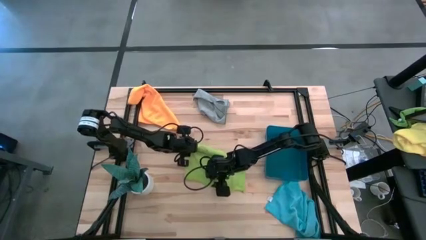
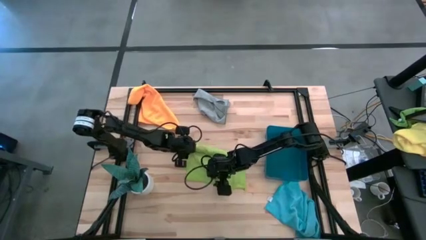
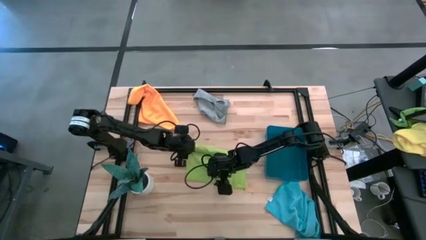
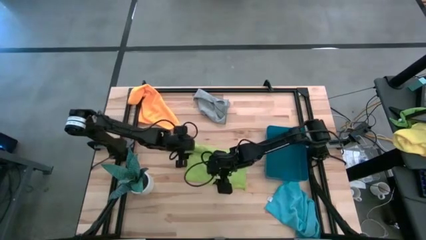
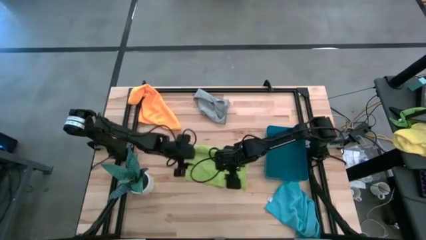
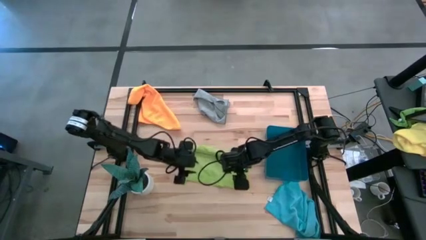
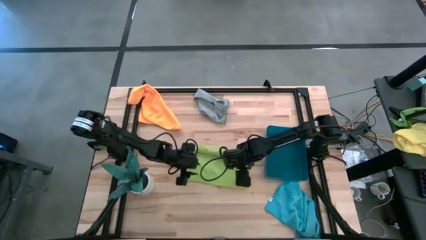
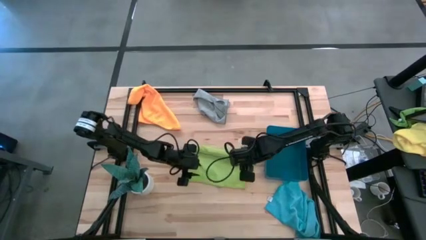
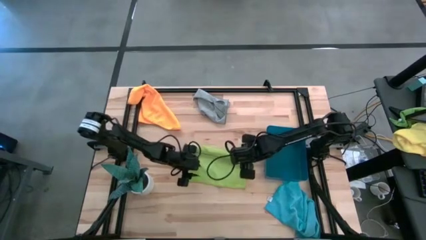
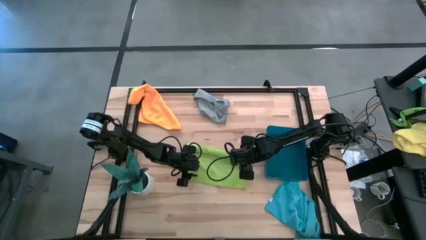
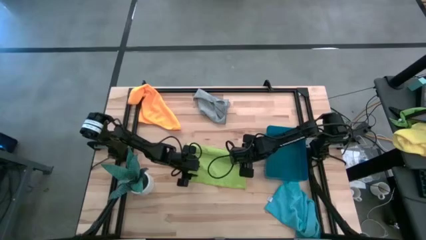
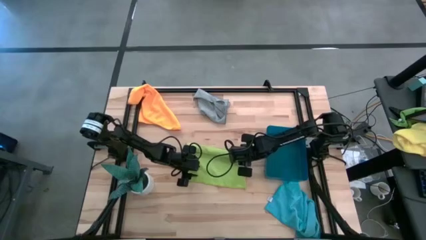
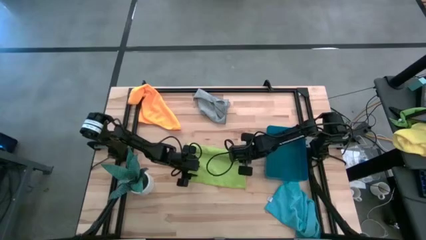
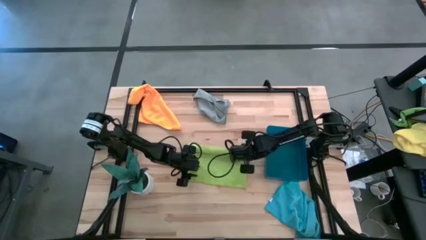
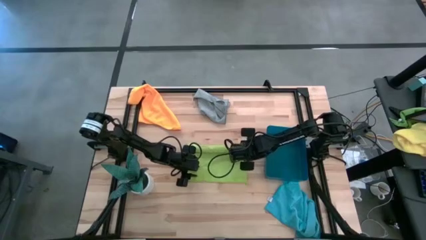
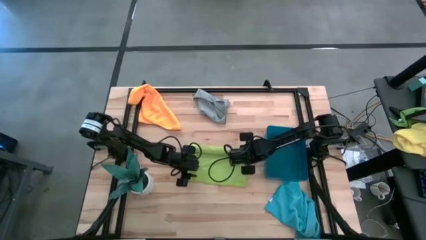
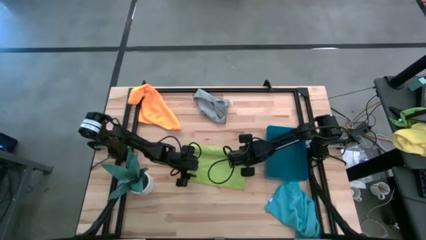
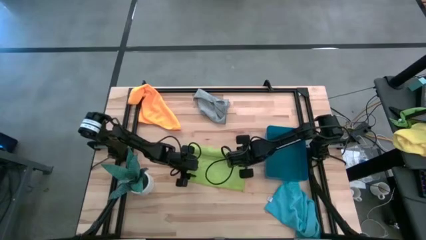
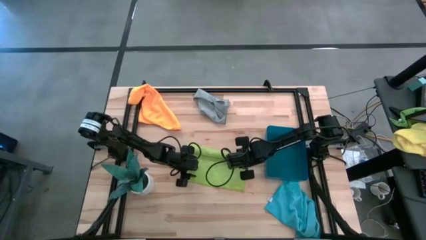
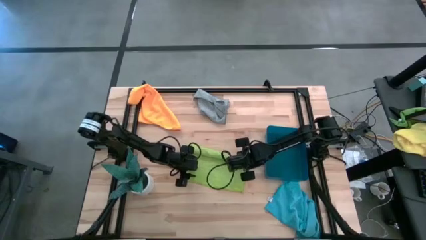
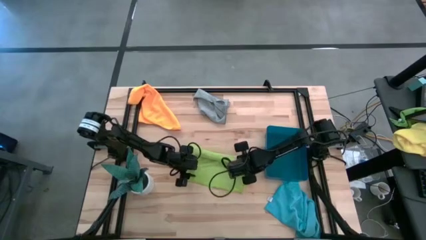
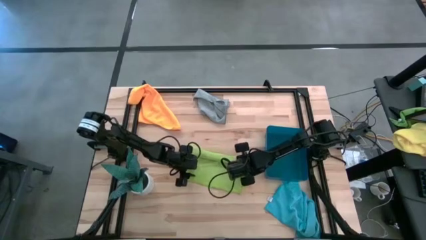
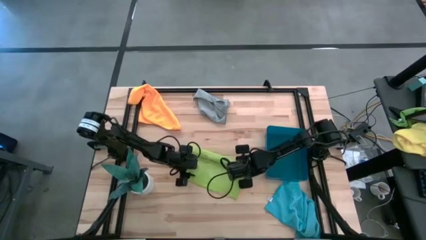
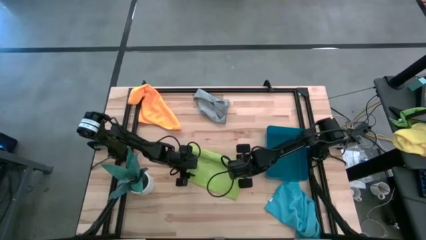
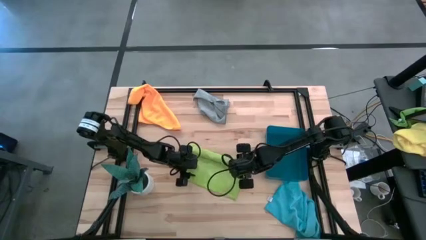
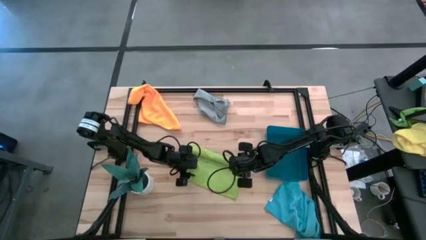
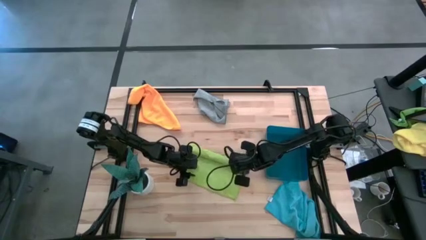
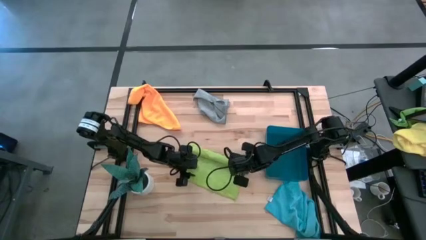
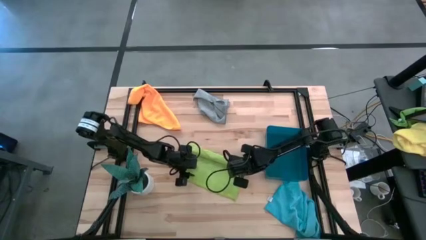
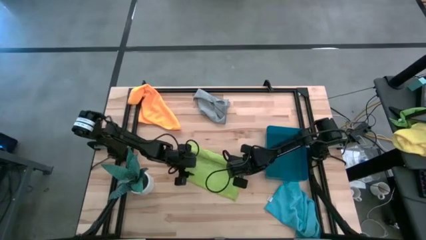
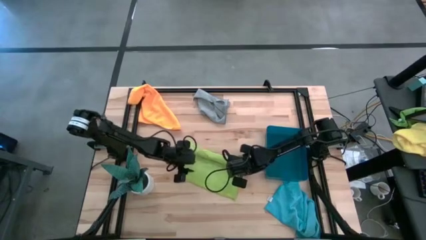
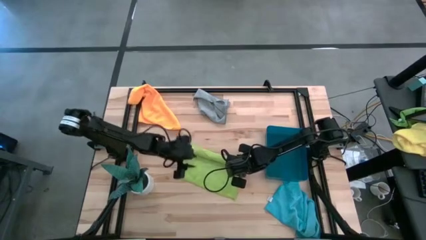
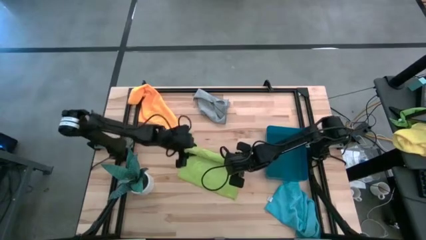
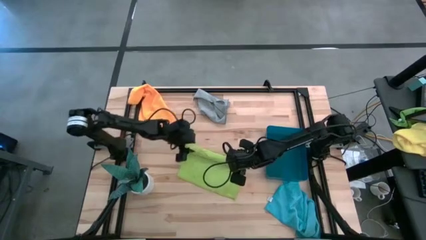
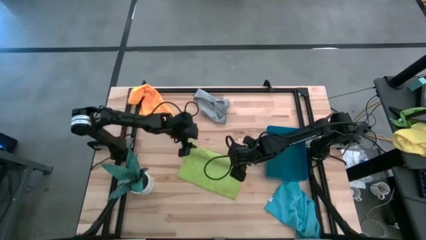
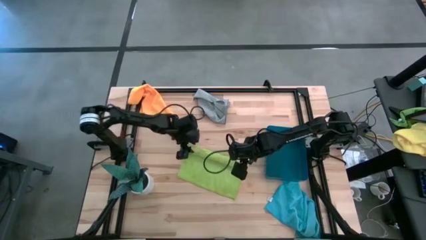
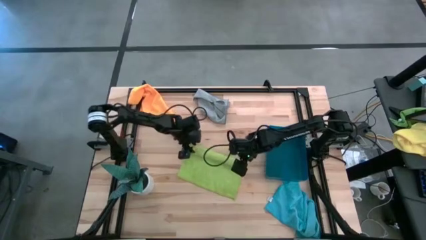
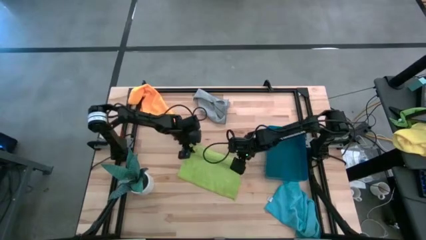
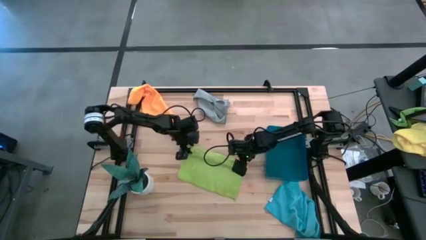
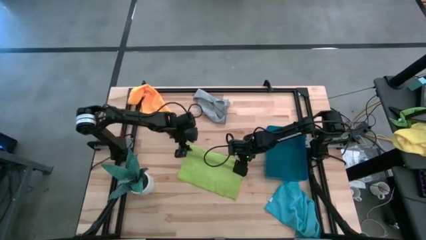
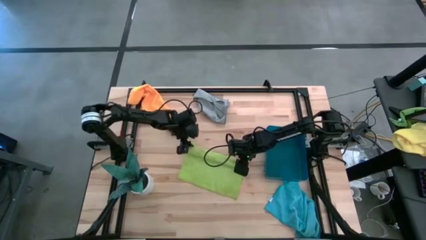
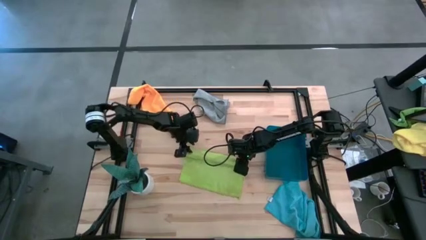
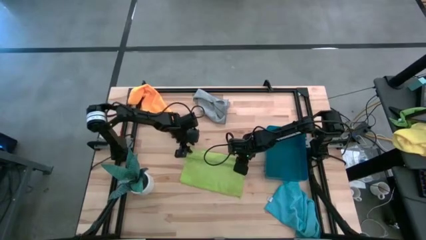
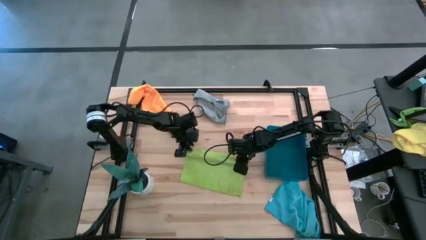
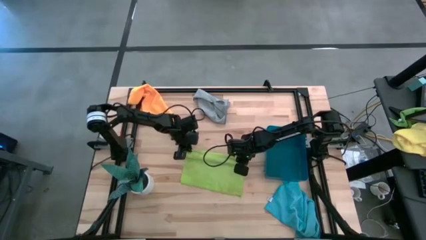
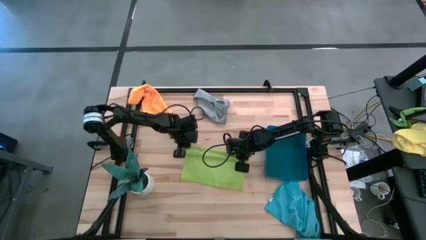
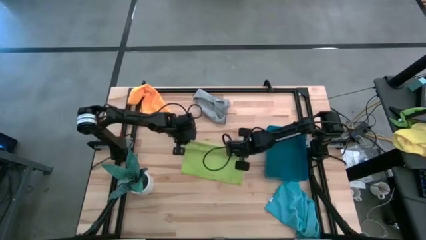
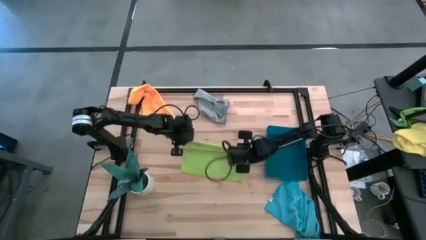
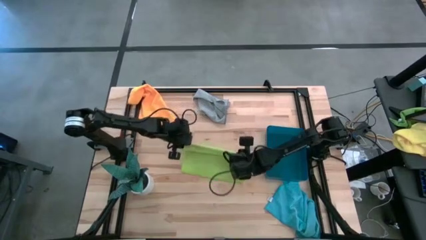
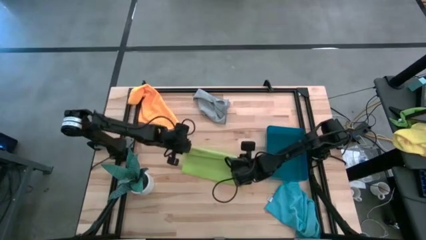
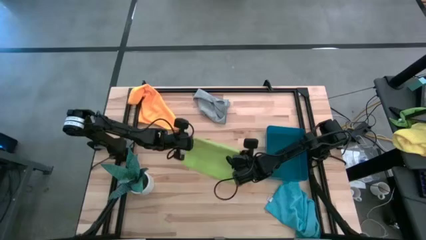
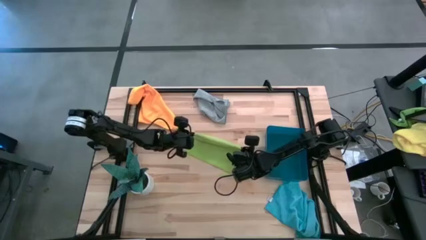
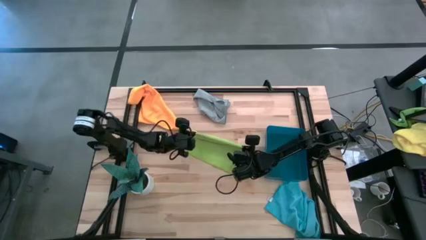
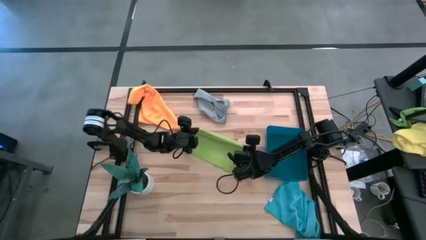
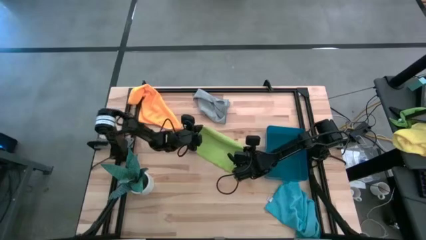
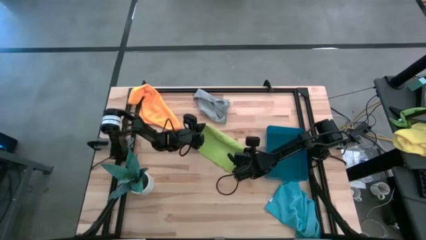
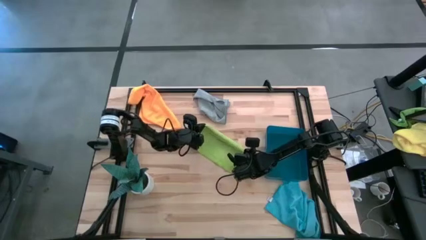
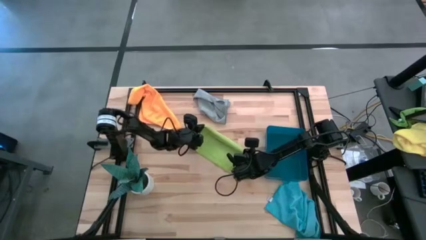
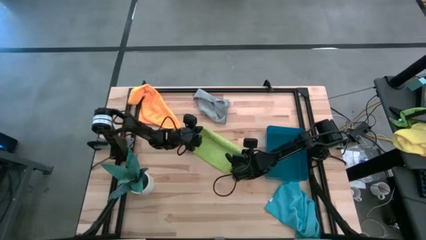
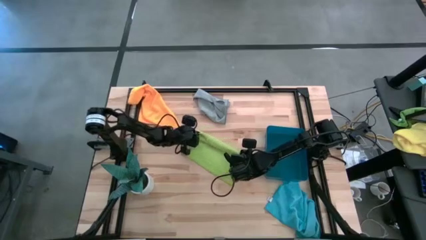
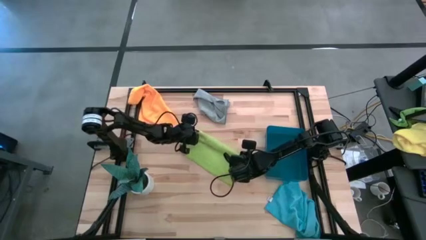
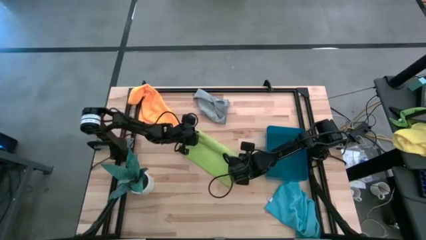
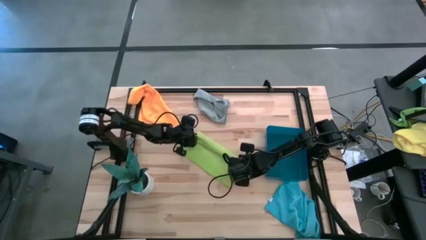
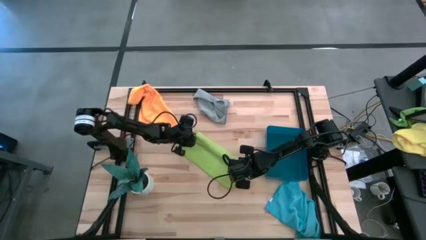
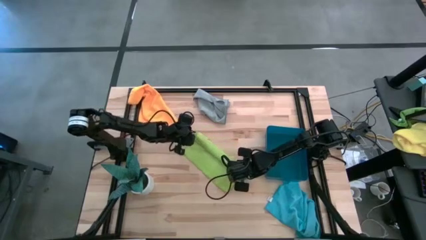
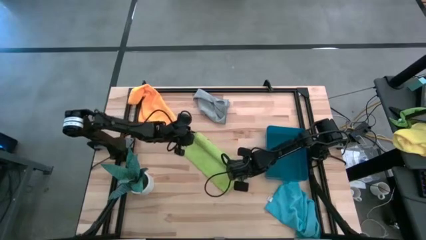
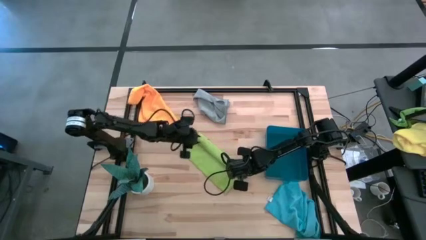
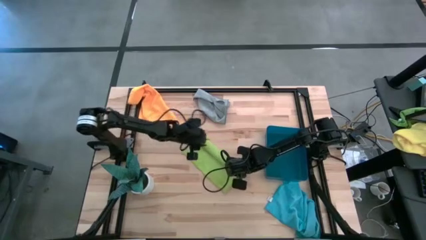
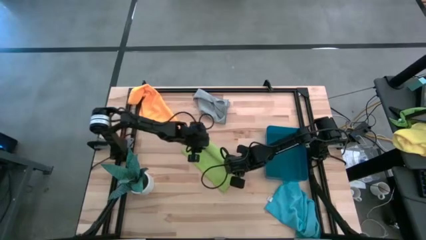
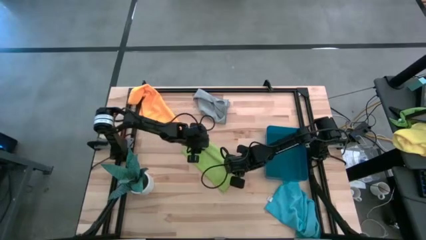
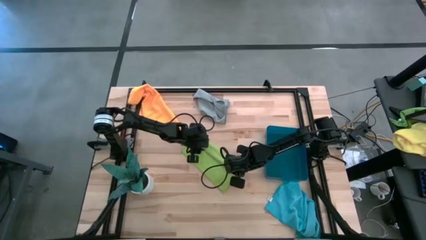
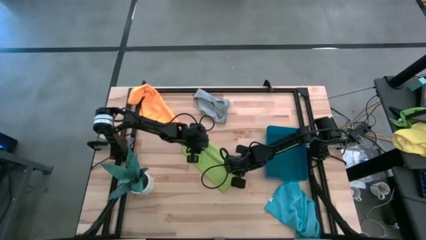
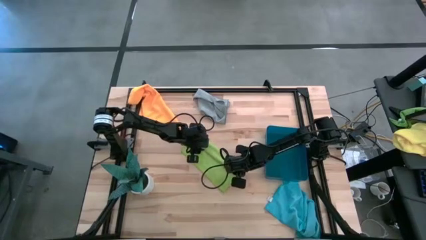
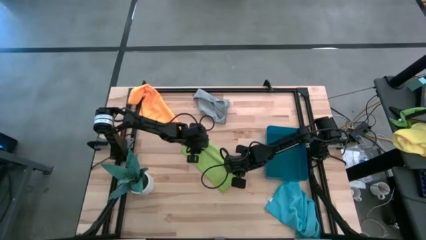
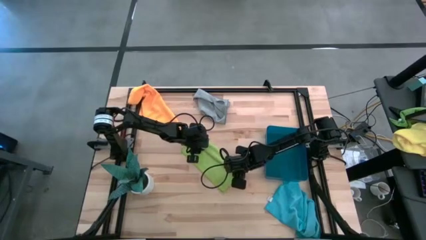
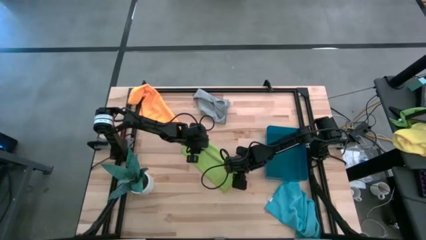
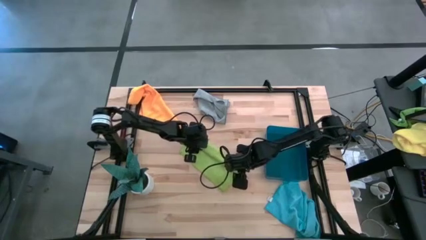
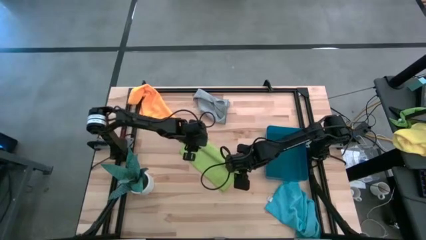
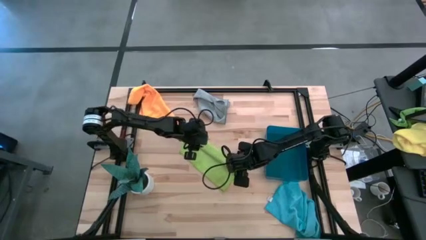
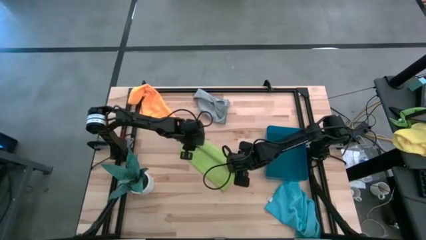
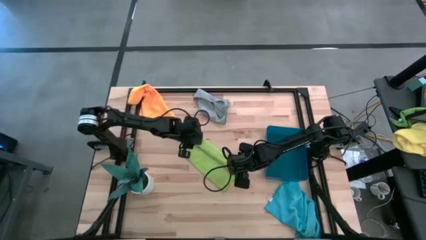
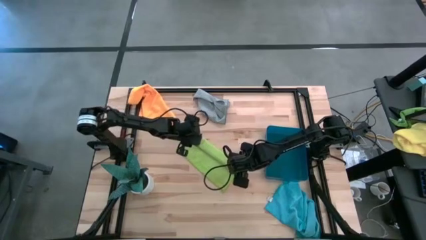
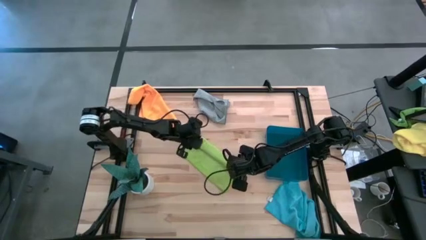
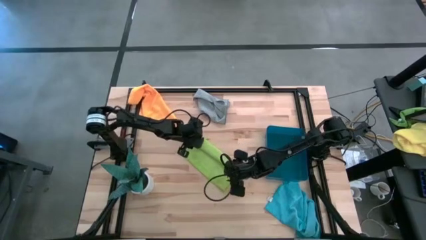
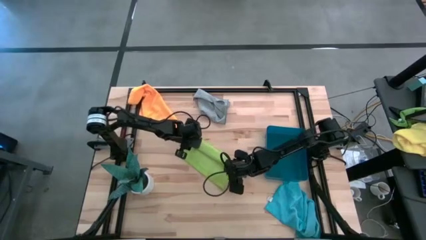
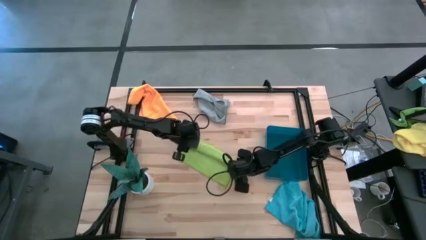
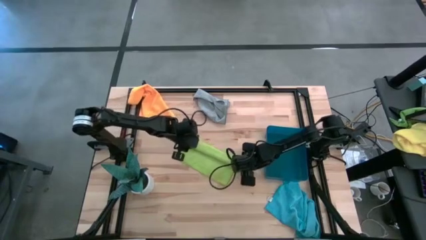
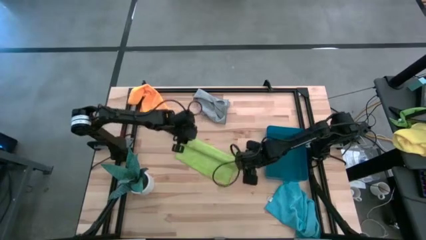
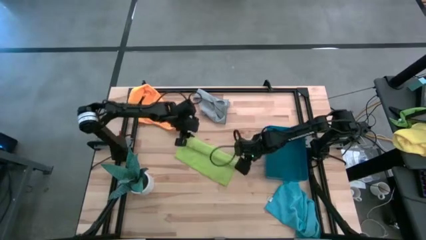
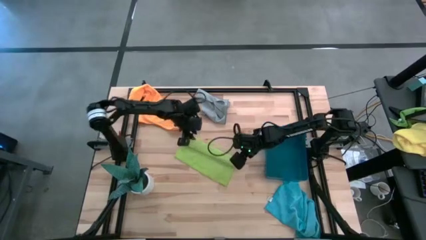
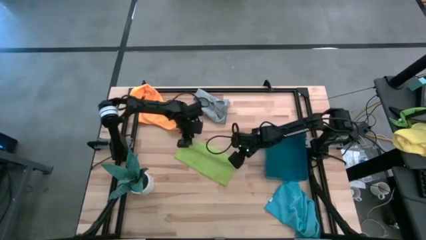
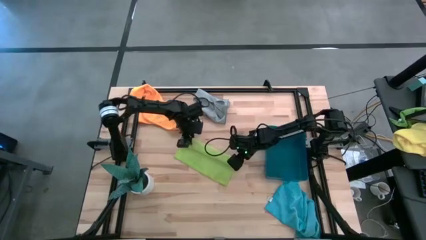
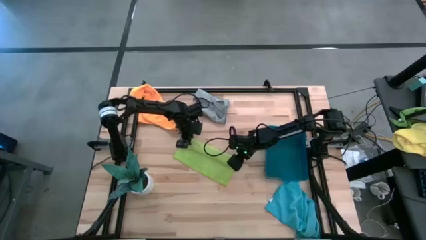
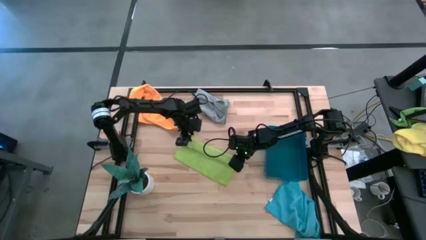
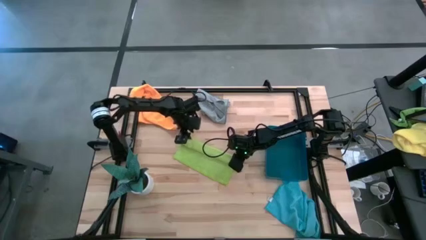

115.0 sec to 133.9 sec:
Task: Roll microfiber towels into tight, uniform cylinder then place into a basket
Roll the green towel
